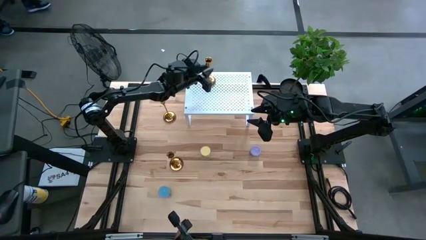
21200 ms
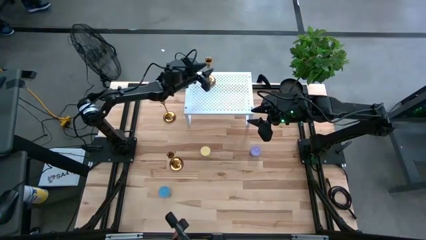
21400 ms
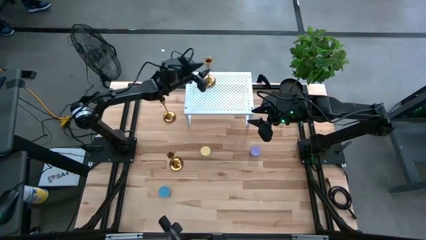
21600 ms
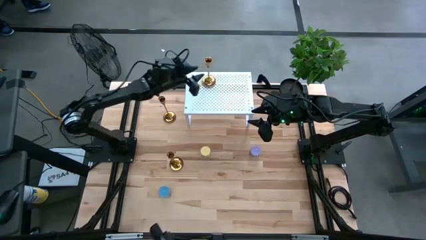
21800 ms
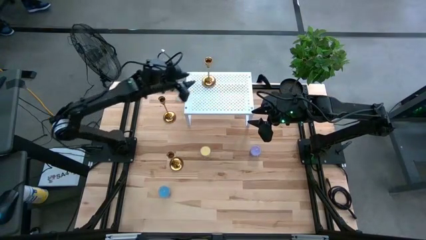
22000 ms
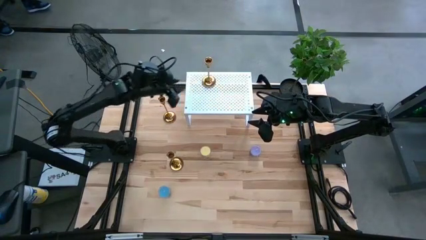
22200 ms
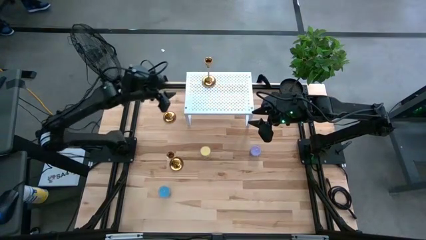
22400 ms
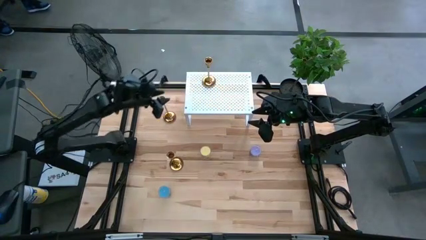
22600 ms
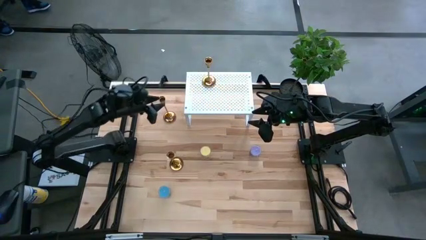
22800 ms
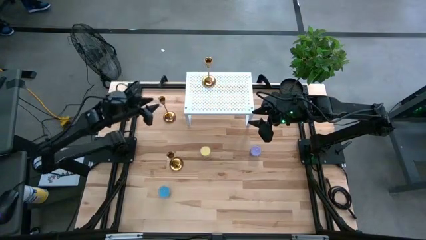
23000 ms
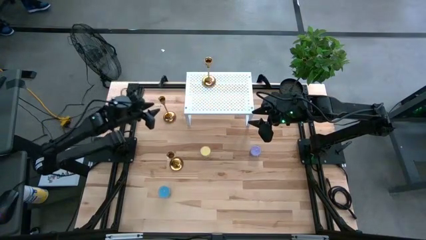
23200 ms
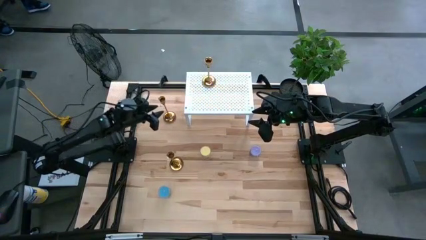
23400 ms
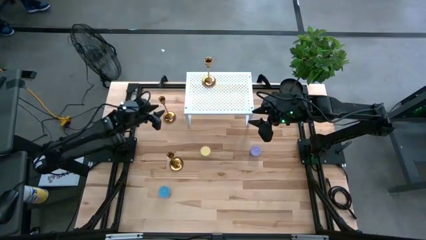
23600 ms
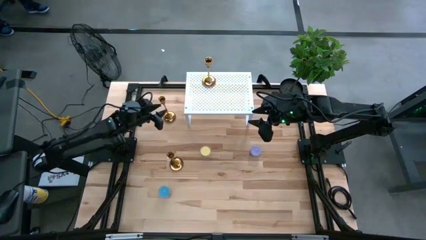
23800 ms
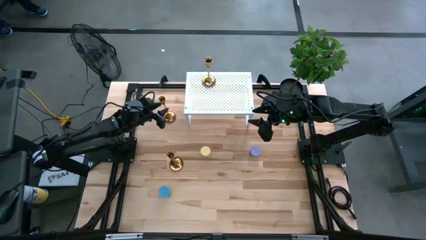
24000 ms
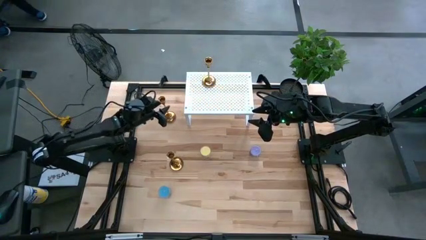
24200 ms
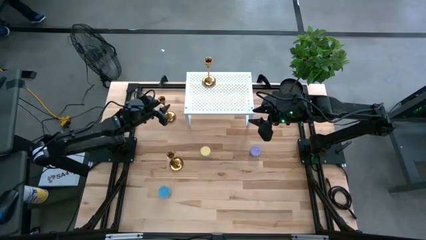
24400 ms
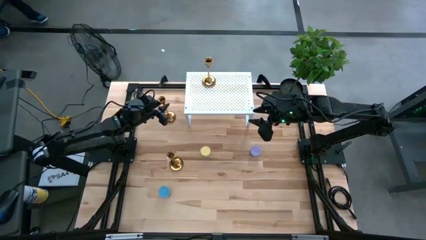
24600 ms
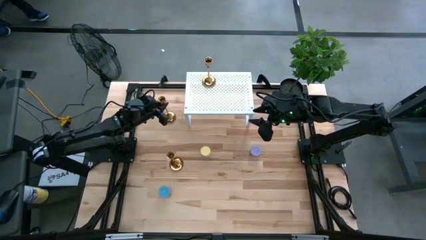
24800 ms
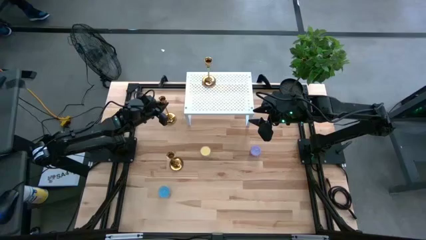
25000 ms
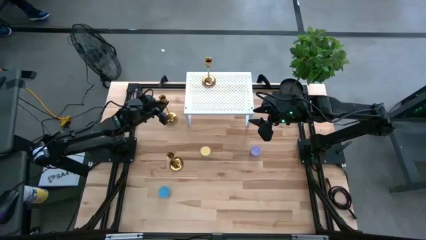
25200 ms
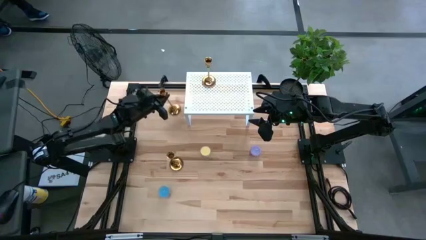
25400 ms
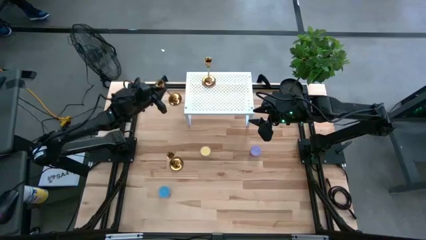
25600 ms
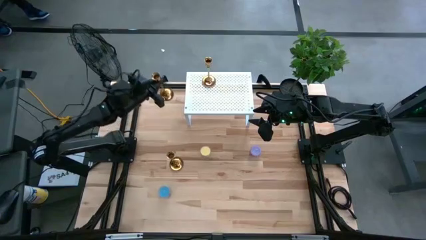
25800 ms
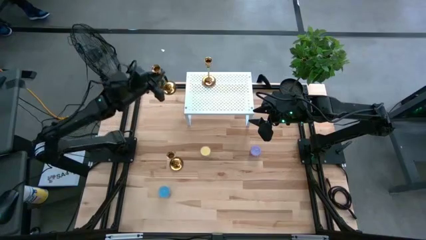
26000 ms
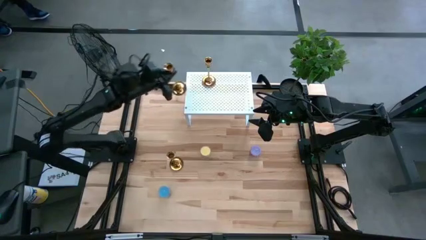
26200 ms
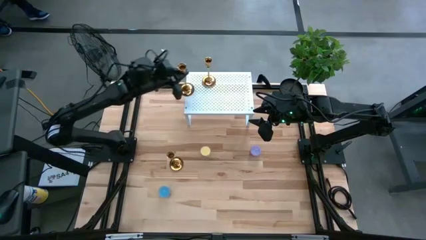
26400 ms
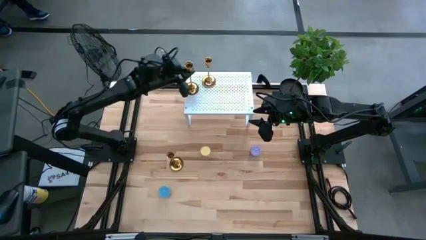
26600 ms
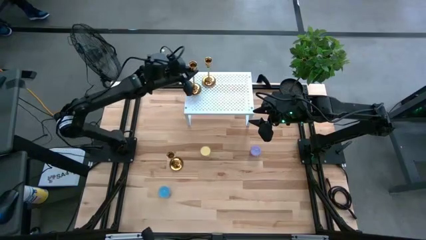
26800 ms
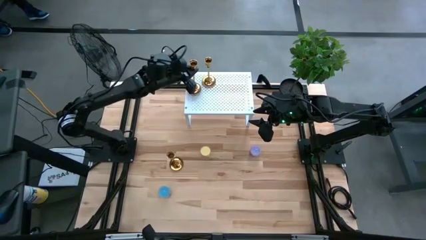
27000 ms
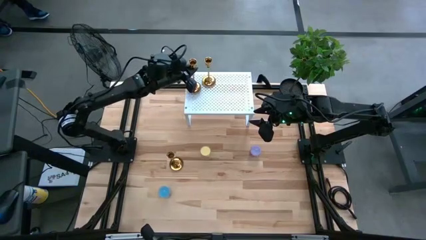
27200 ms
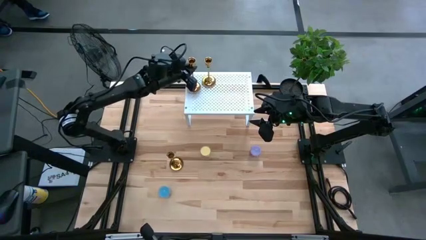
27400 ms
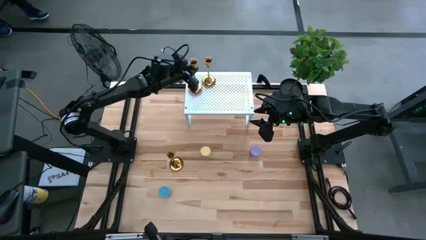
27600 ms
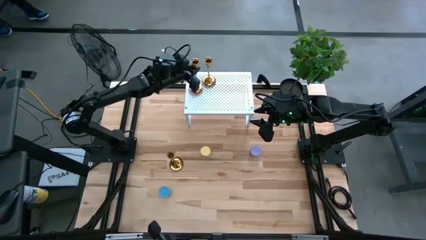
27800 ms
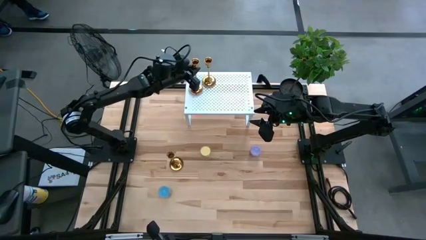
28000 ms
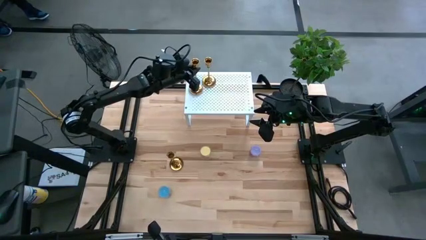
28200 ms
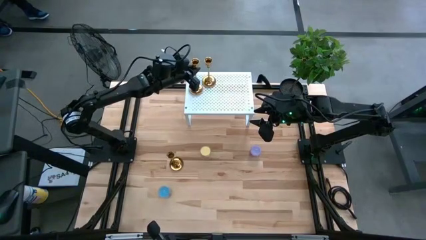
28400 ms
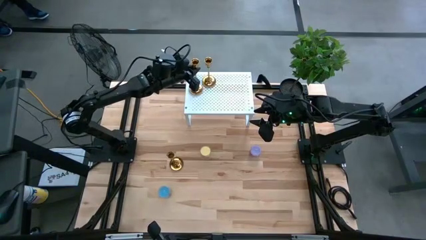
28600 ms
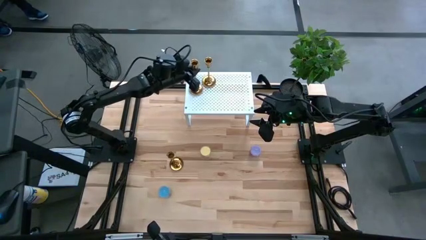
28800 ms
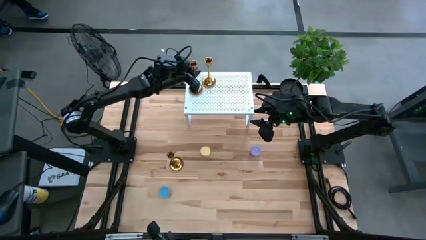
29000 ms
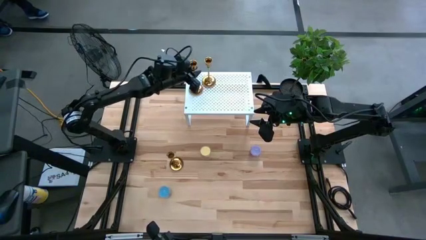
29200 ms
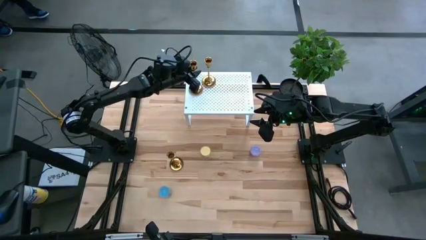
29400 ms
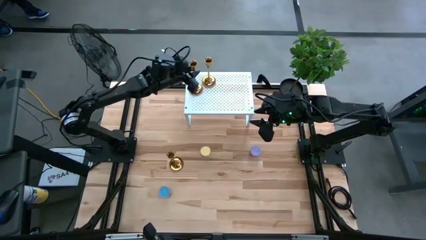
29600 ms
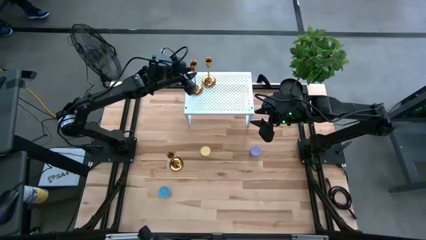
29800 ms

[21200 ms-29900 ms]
Task: Pick & Place candle stick holders
Put the top gold candle holder on the shelf

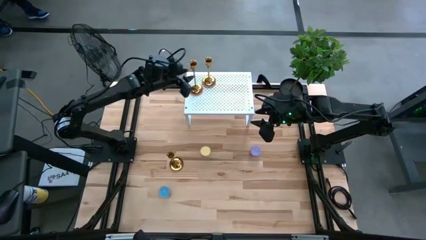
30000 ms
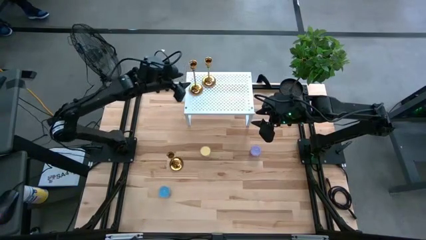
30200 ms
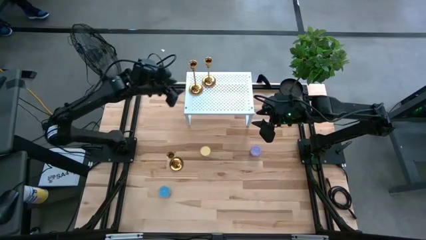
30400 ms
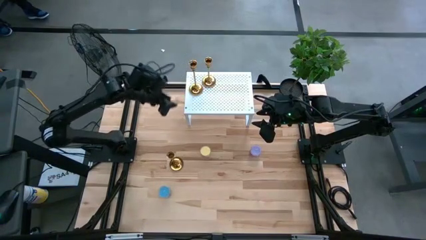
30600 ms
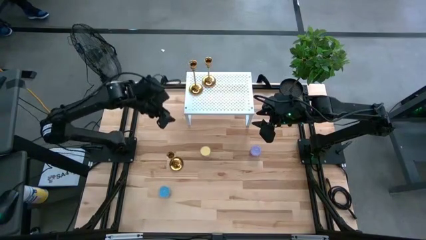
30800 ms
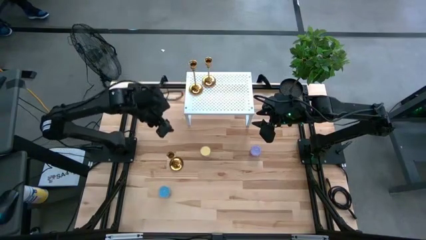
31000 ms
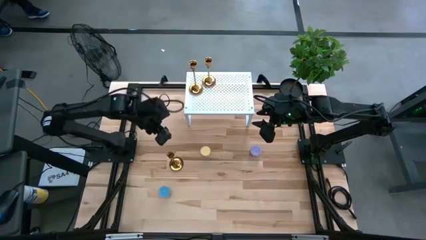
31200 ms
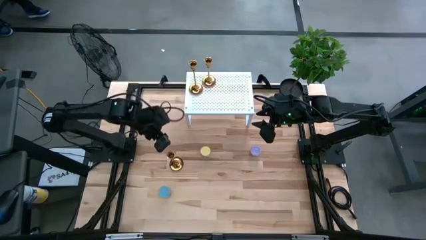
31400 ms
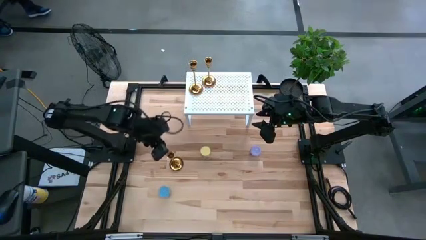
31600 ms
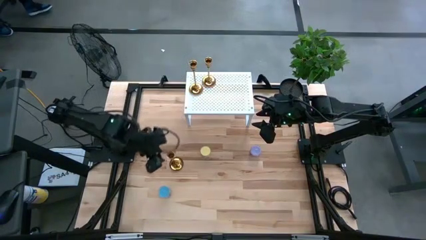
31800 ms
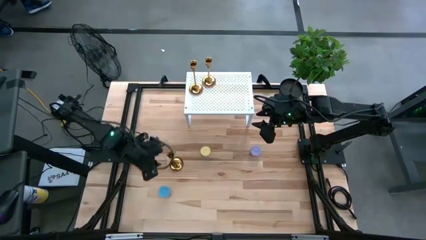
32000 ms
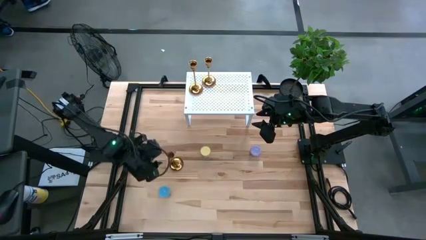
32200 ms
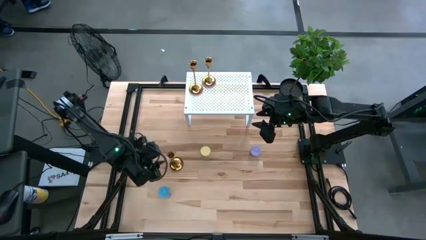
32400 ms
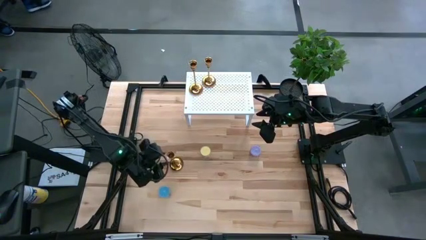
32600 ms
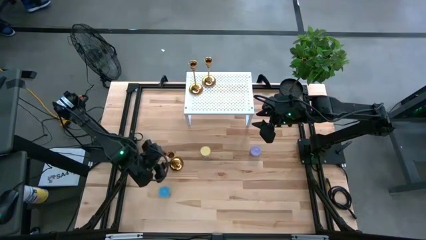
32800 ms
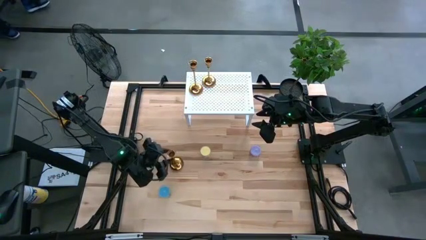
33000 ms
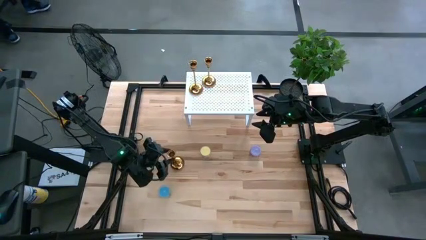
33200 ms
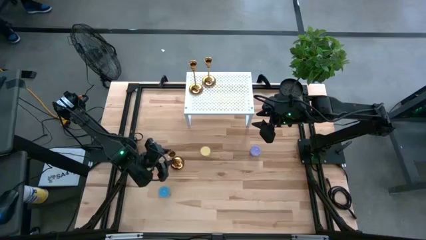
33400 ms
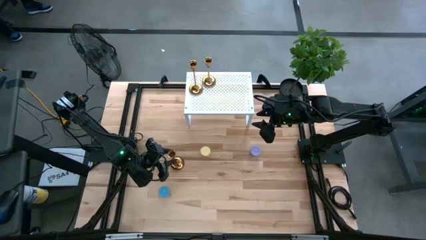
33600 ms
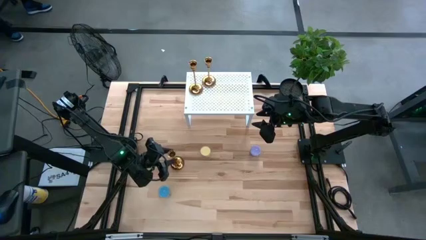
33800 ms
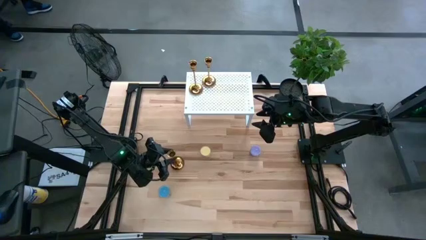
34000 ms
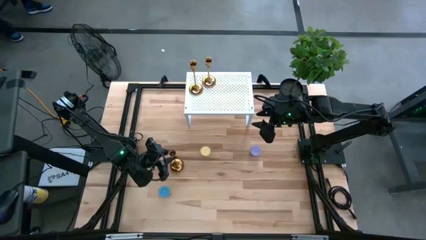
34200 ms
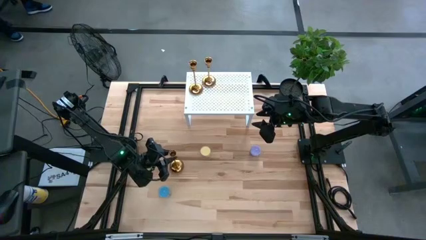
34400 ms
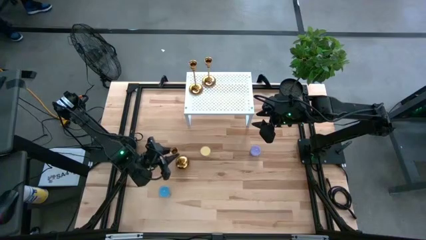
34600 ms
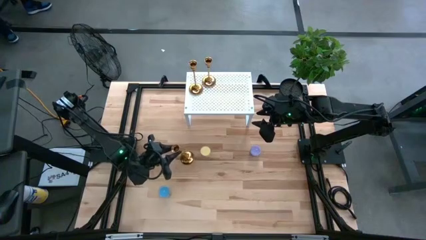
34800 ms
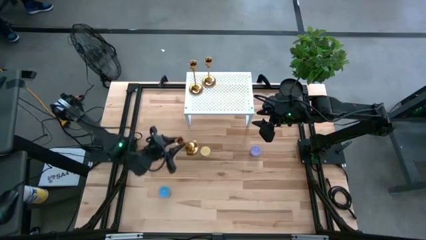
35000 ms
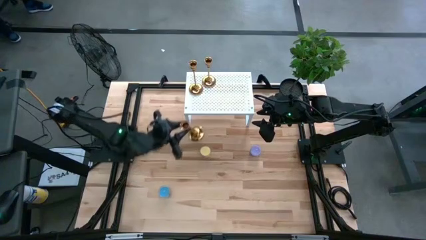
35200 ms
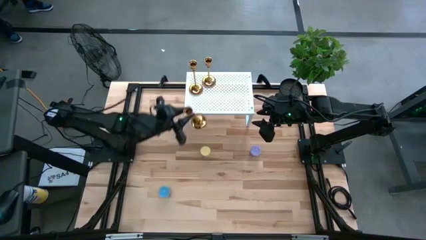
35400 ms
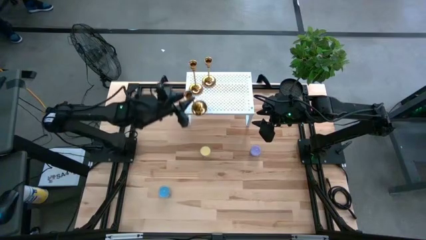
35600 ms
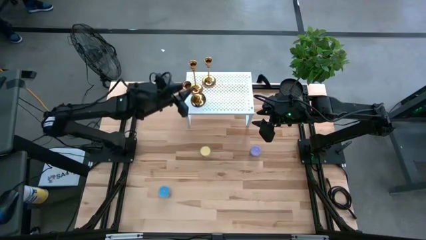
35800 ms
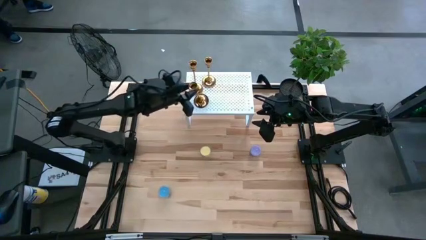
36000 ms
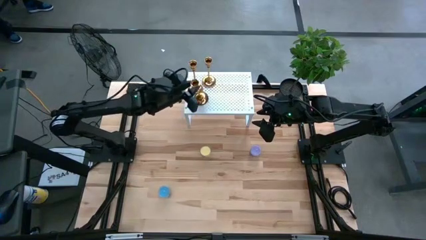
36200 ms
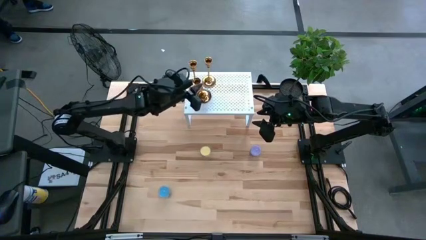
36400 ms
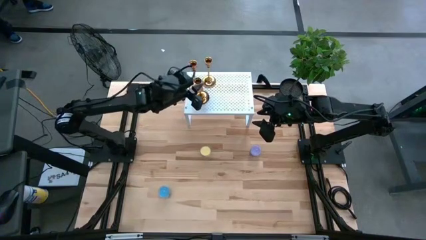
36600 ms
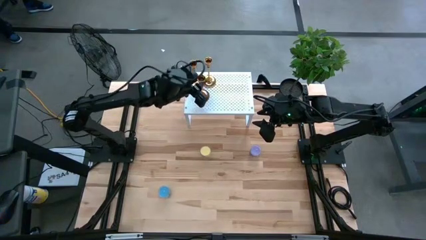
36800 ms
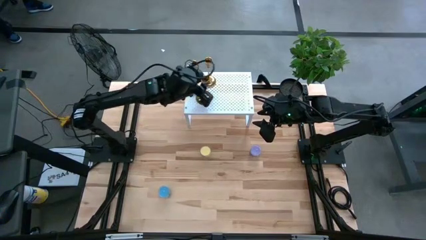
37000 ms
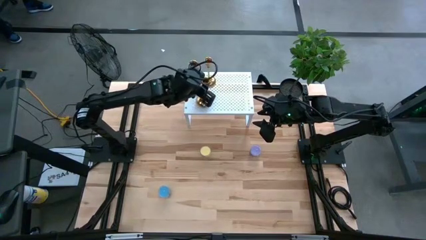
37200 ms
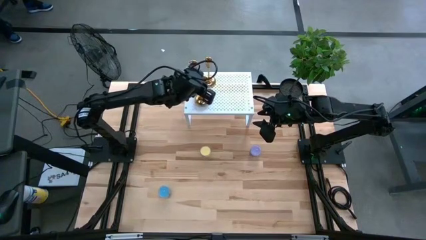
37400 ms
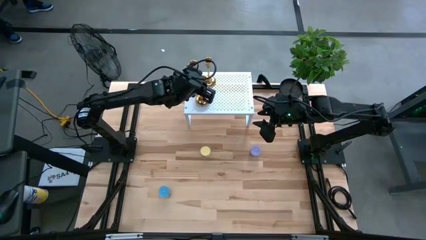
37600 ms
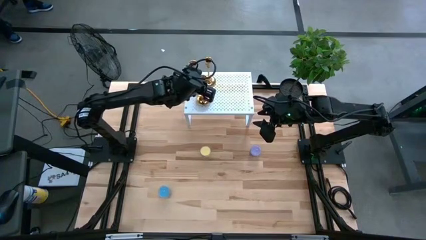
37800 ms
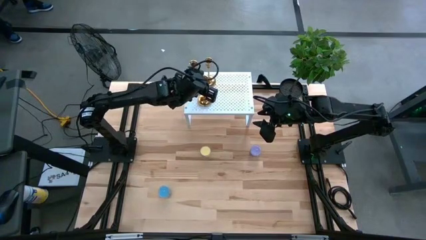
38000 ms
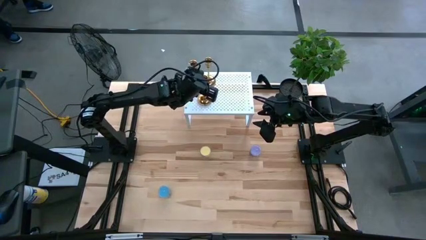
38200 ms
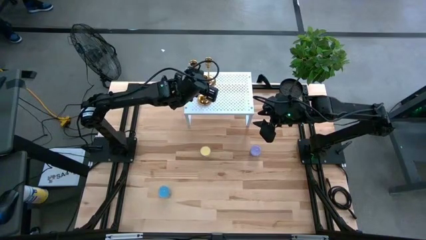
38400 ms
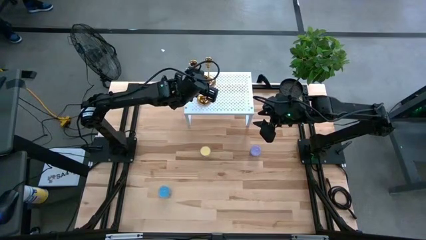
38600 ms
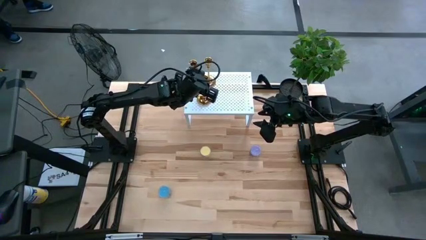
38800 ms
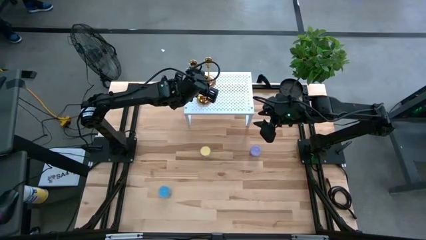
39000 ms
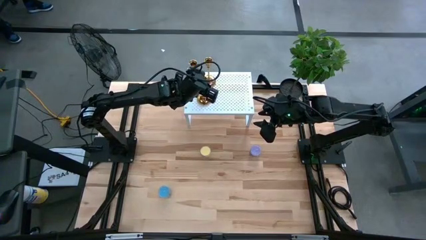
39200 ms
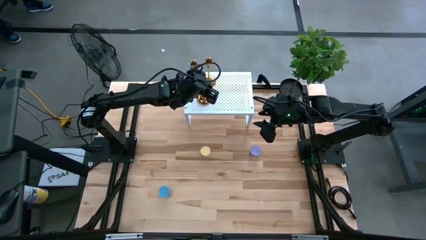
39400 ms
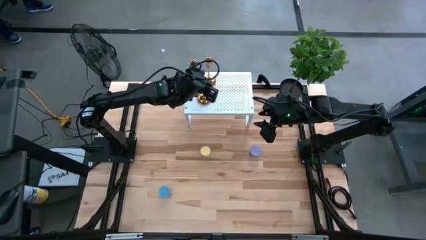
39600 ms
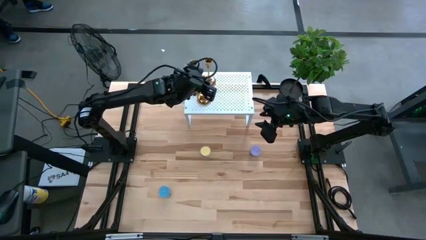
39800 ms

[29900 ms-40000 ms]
Put the gold candle holder on the shelf
